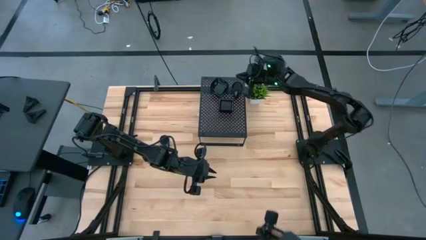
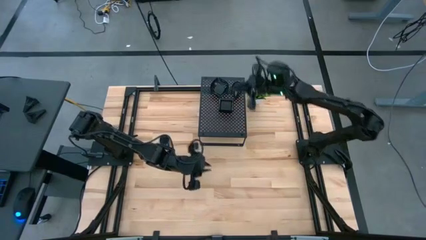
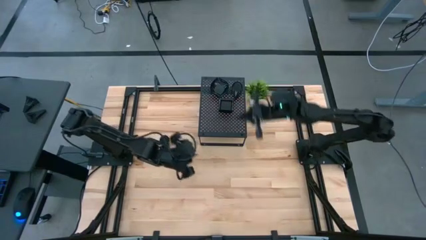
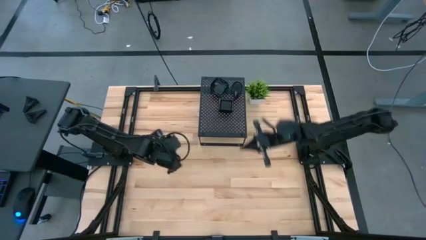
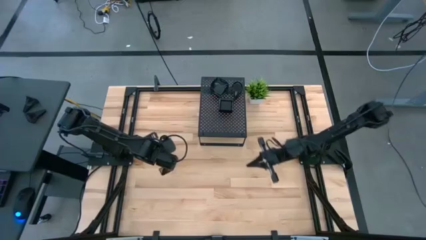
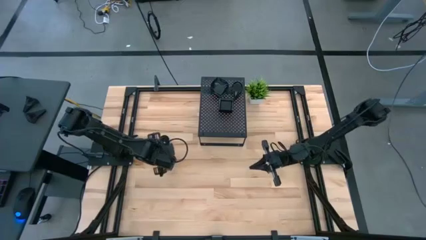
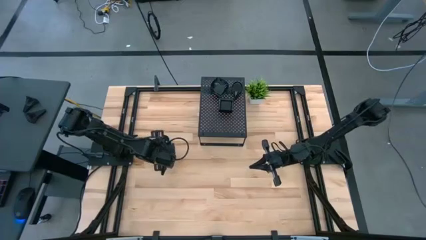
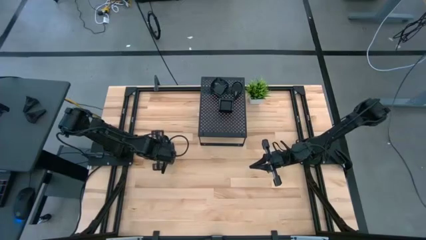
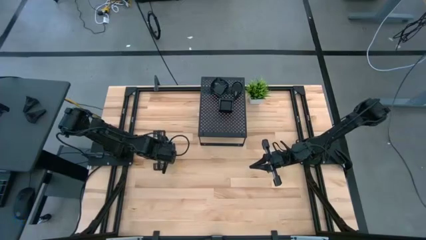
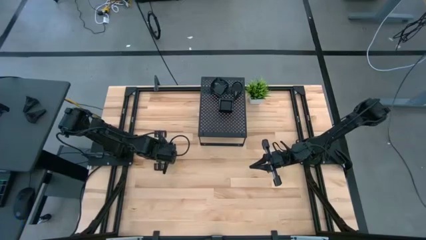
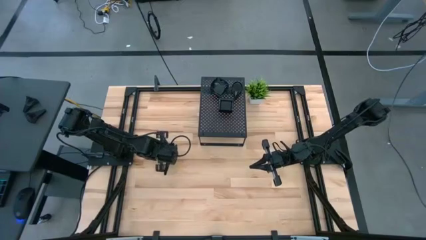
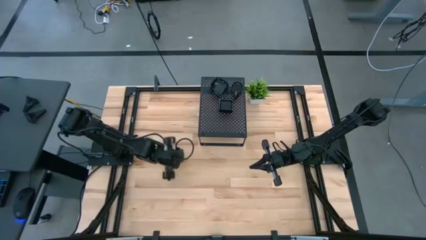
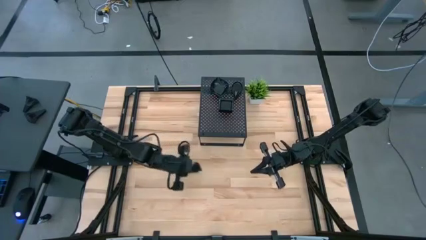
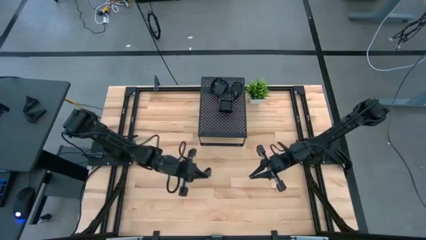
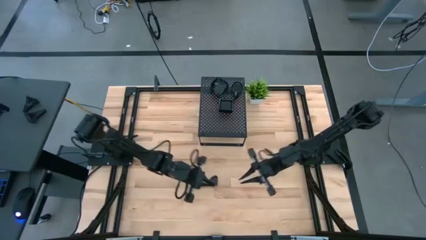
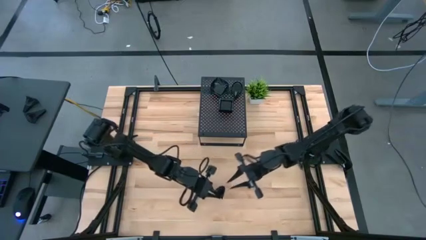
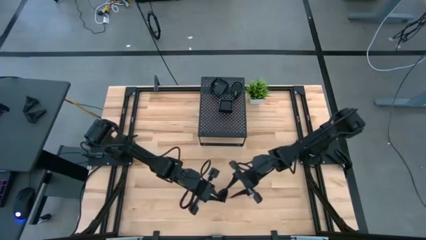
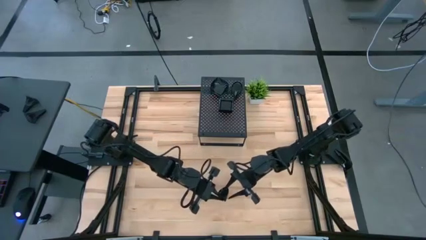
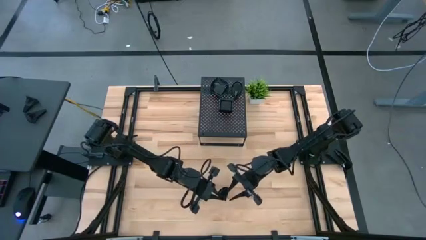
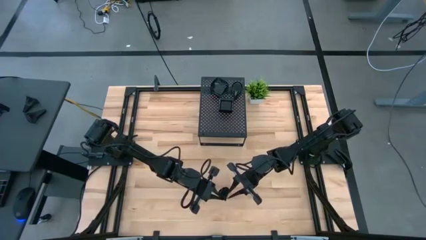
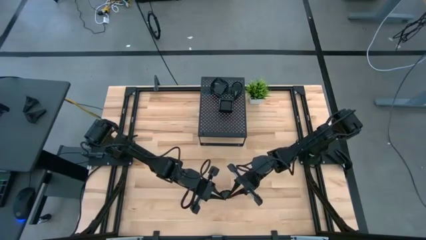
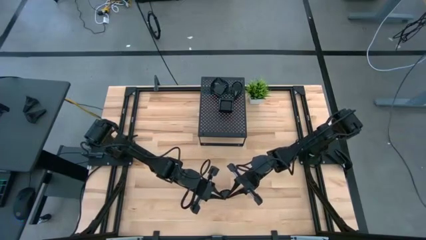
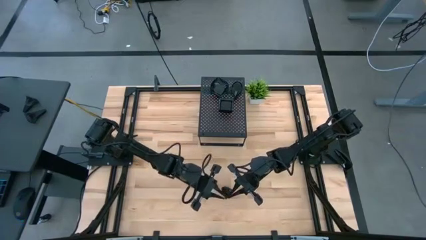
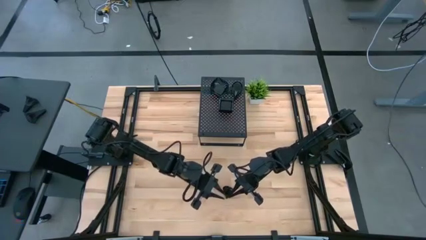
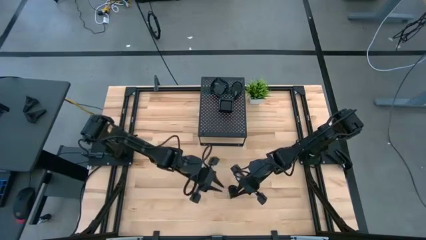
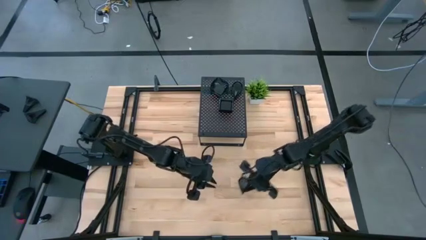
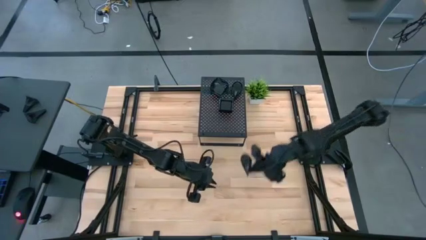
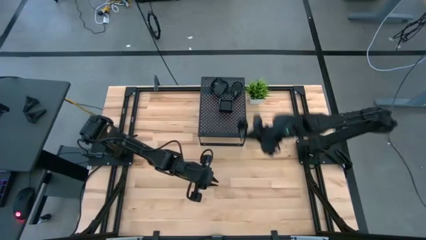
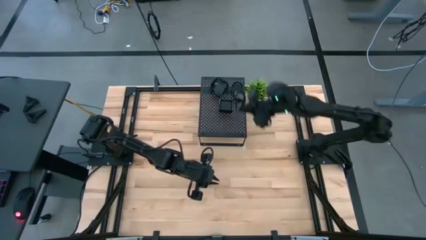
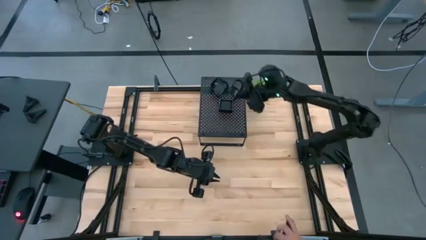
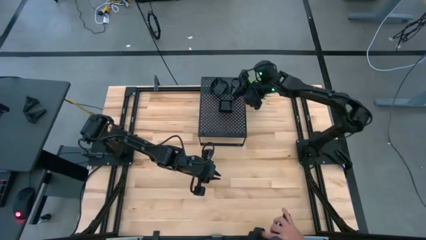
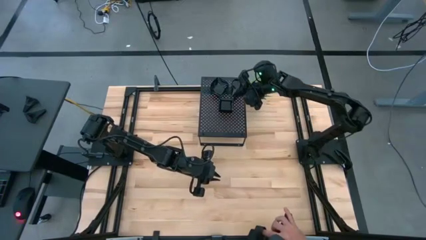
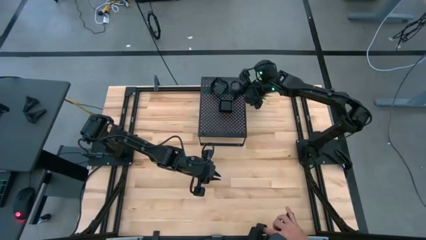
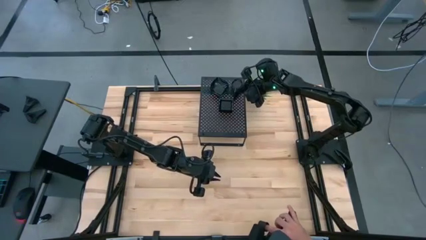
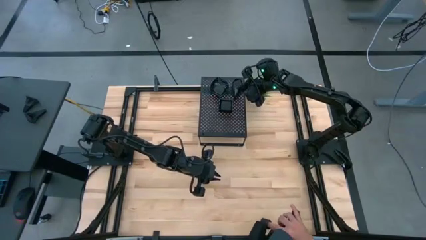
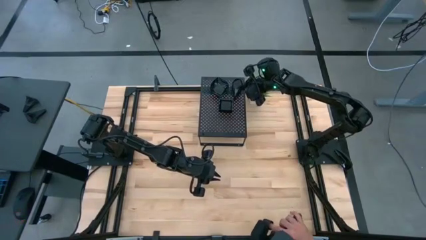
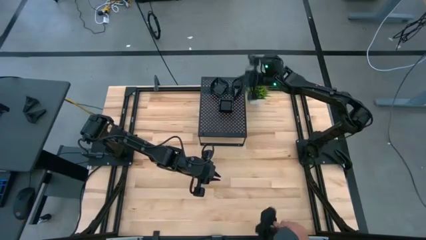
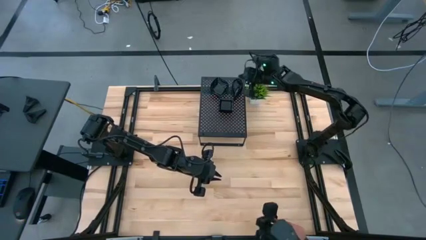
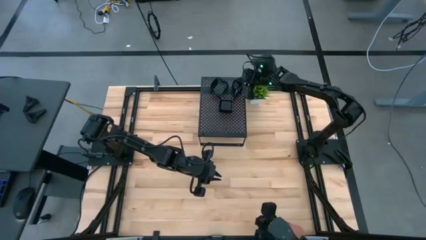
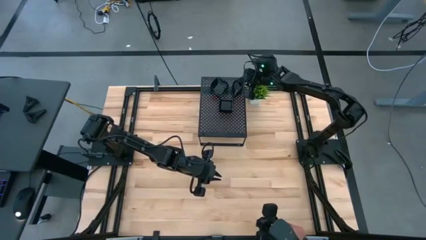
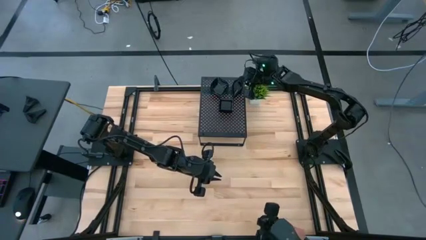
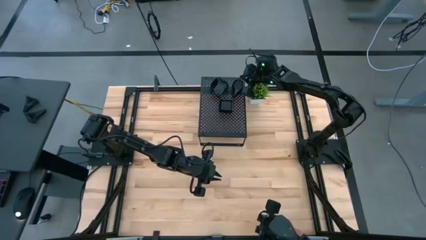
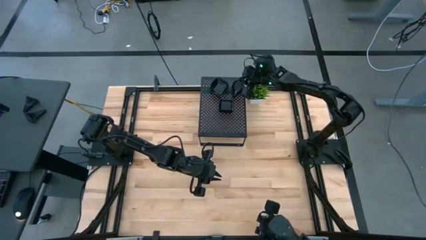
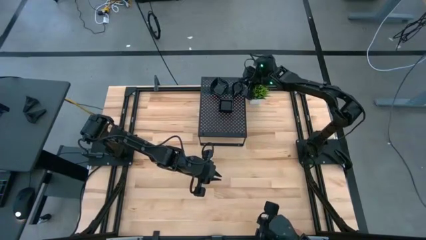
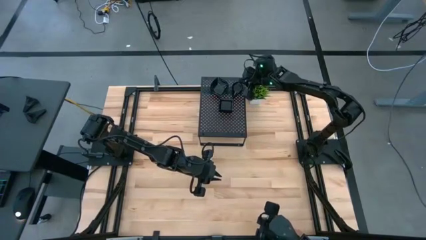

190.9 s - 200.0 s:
Task: Pick & Place Mini shaped plates
Stack the black drop-shaped plate on top of the black drop-shaped plate on the shelf

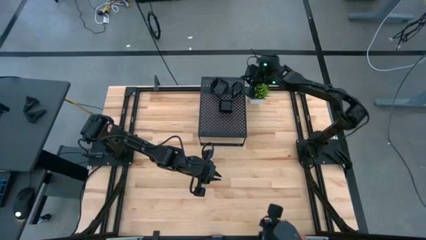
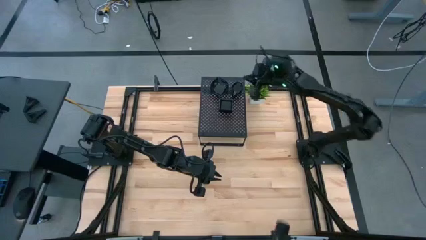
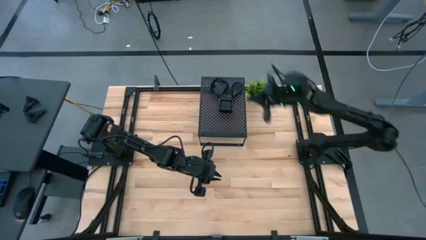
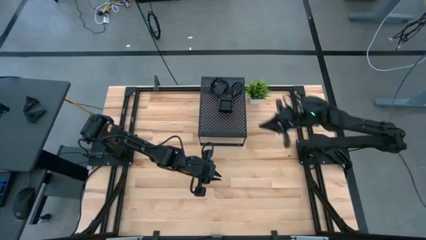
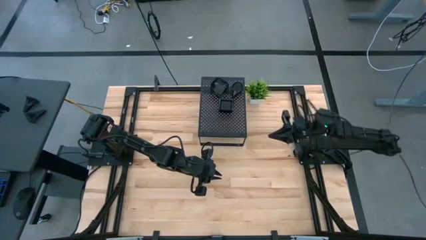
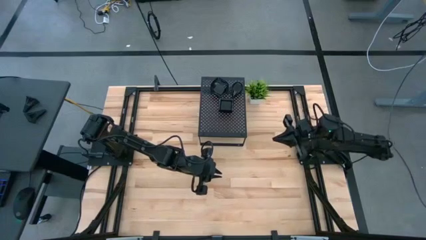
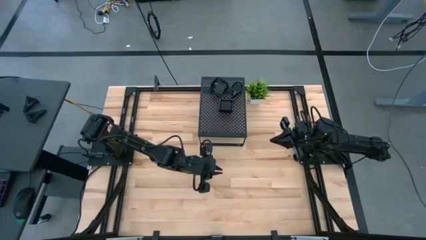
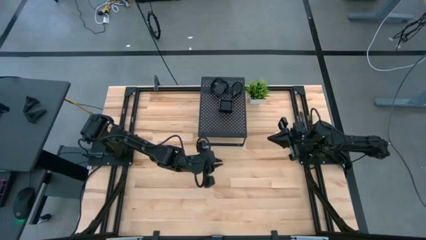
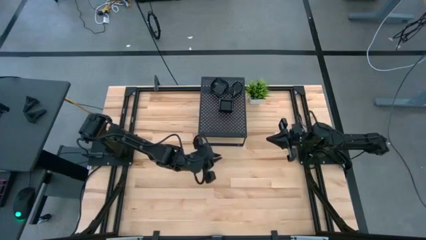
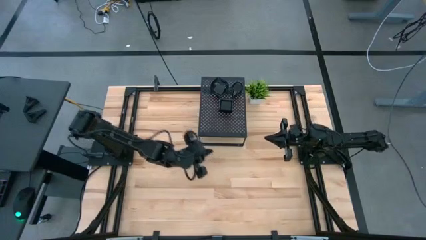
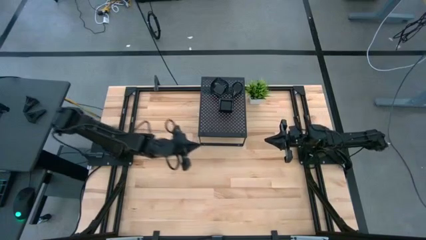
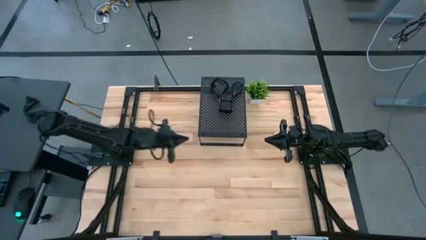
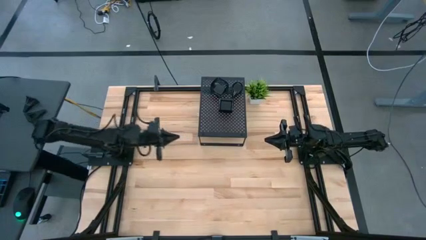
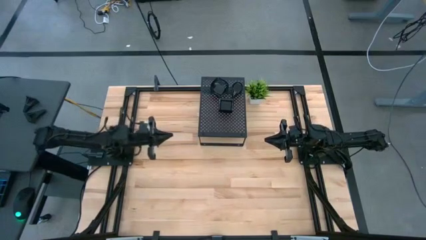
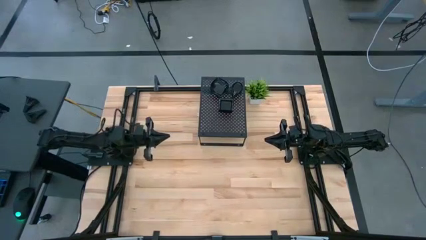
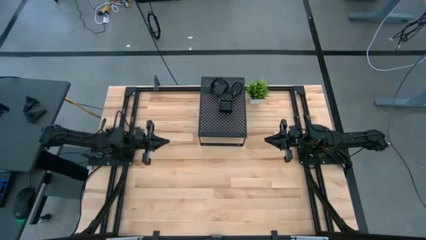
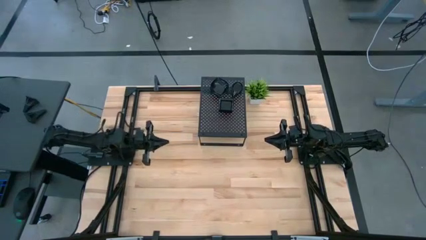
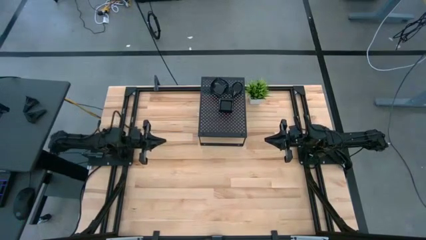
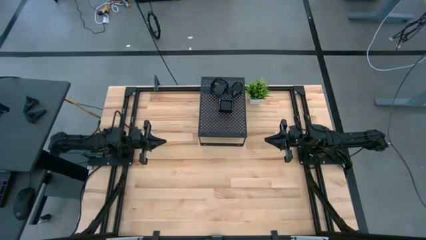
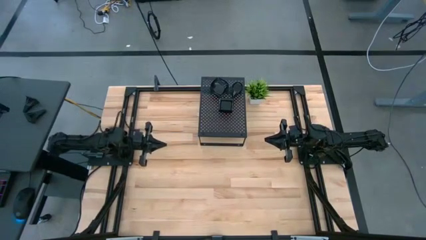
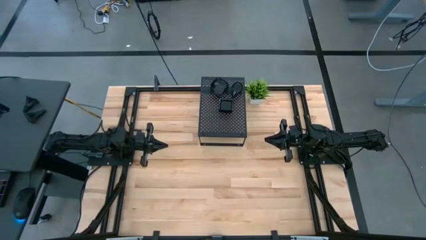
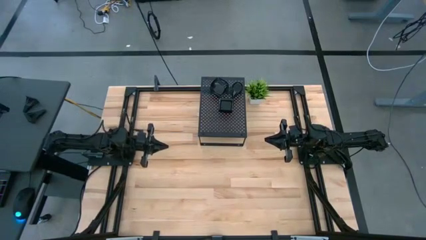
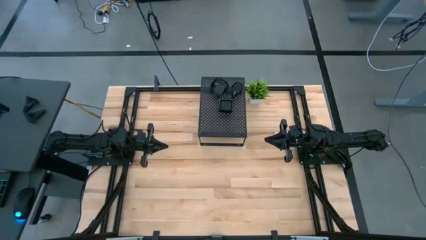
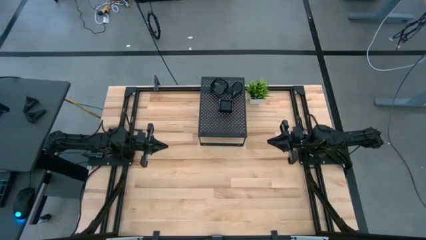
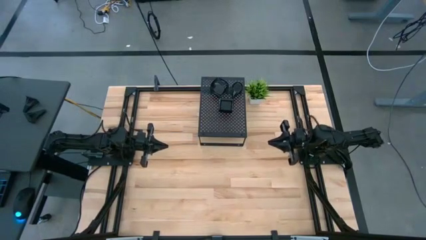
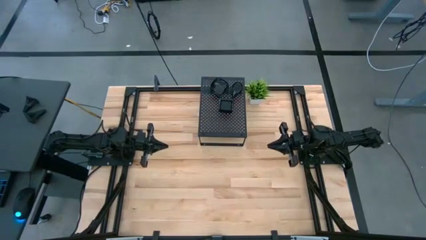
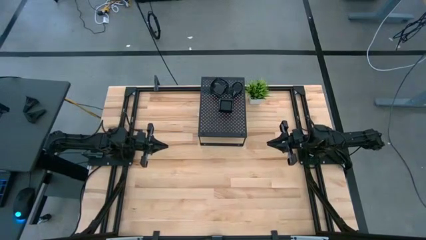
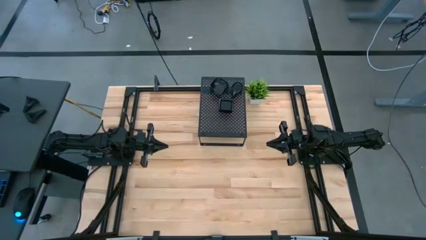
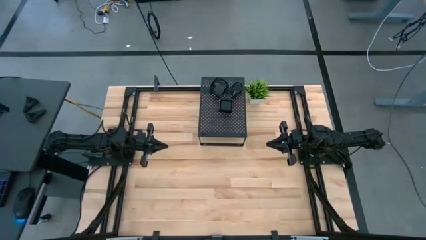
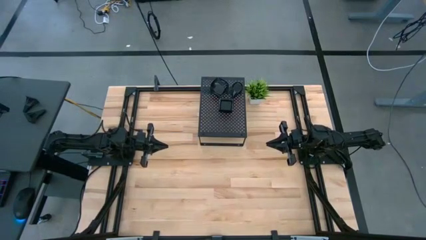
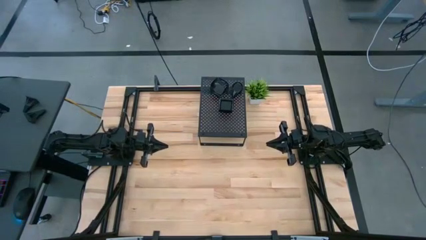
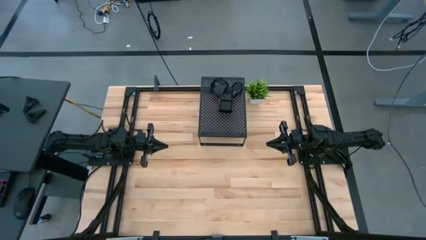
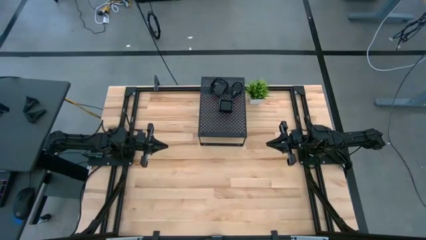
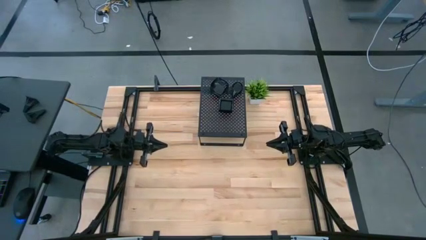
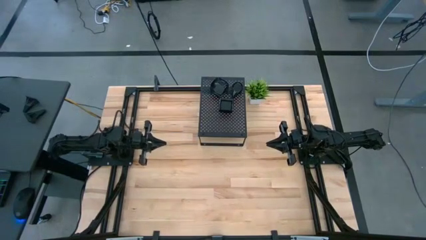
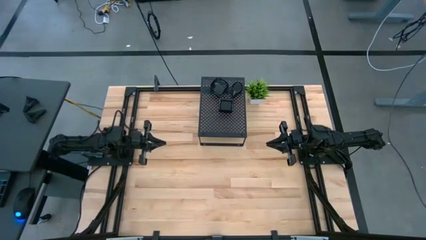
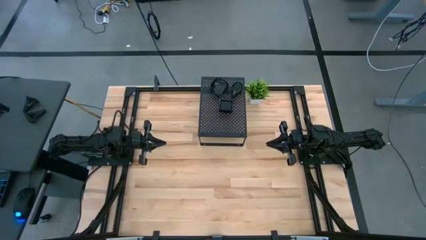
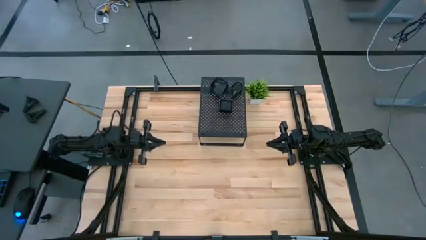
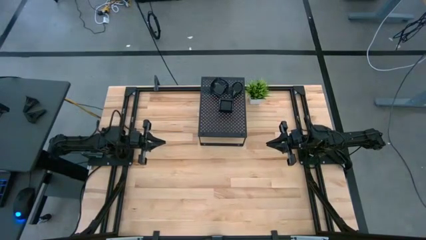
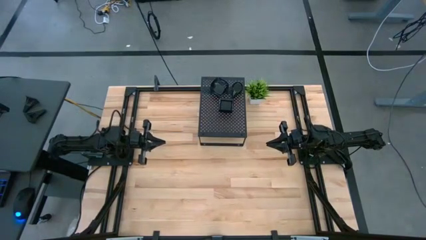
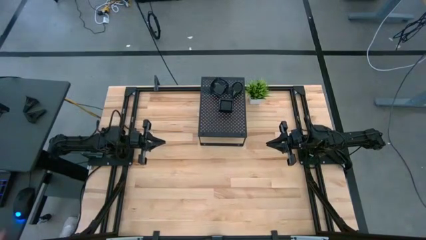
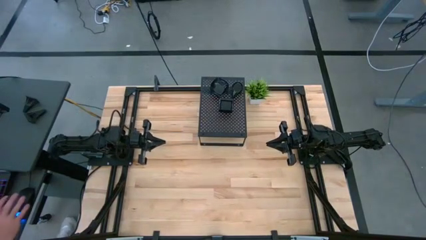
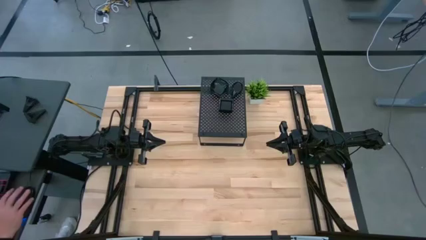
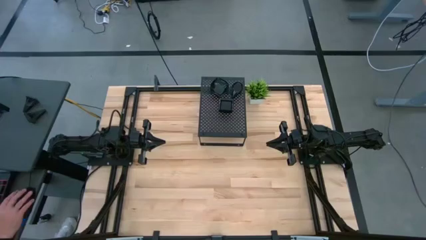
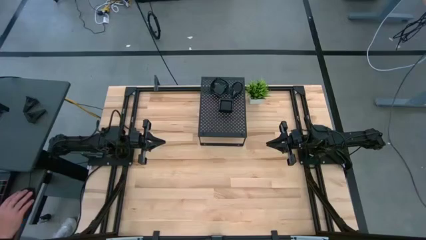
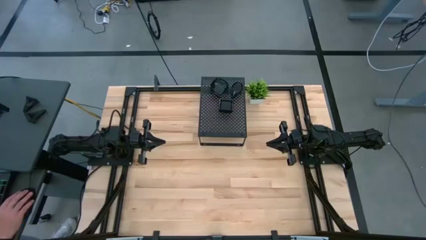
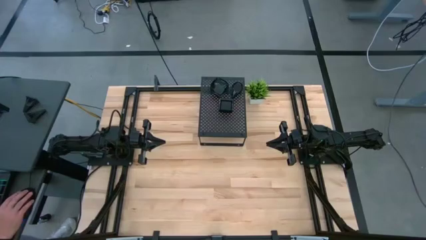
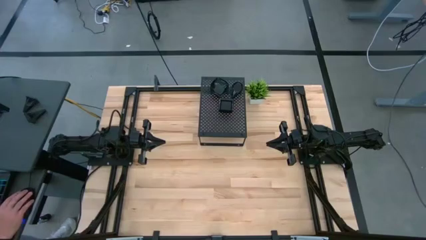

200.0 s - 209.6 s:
Return to Home Position
